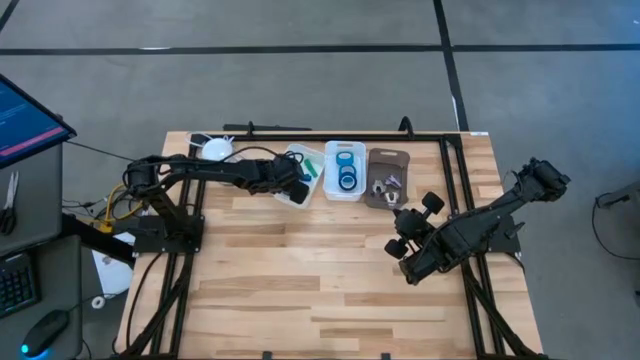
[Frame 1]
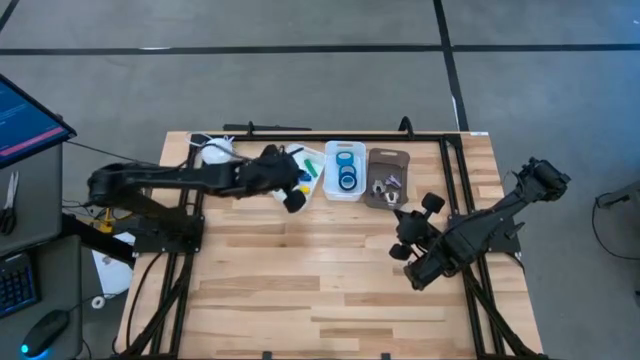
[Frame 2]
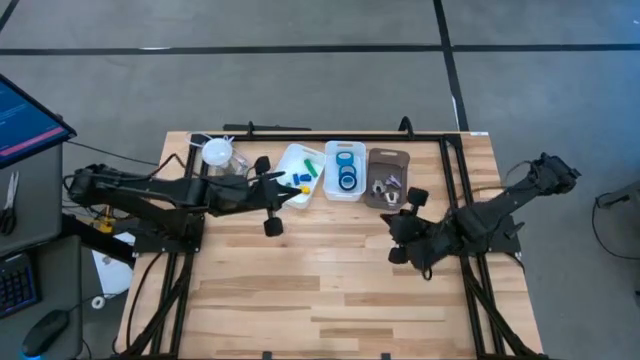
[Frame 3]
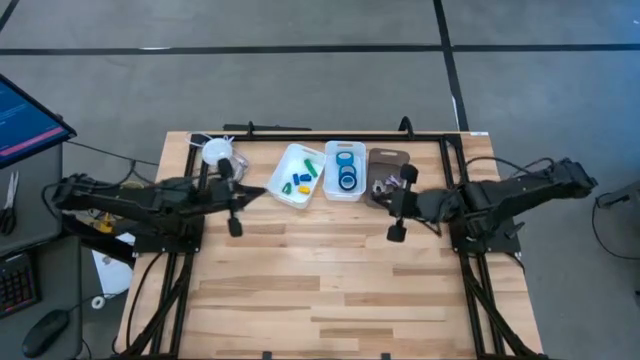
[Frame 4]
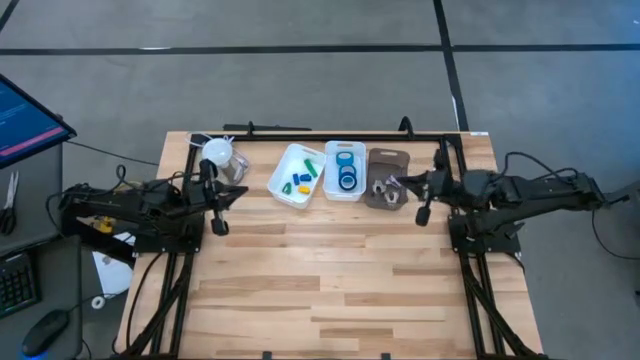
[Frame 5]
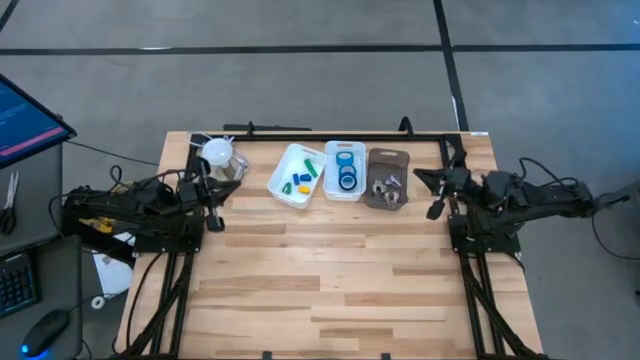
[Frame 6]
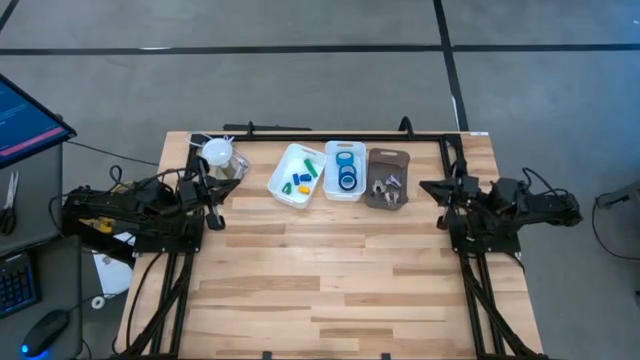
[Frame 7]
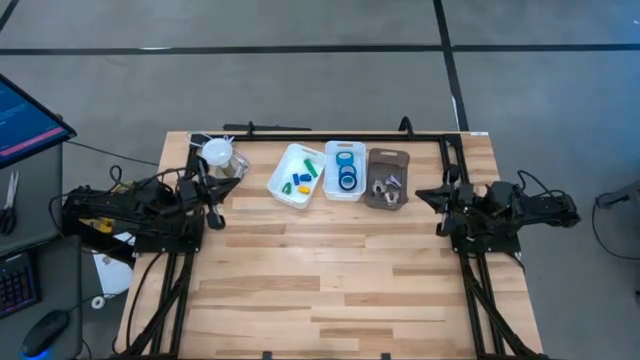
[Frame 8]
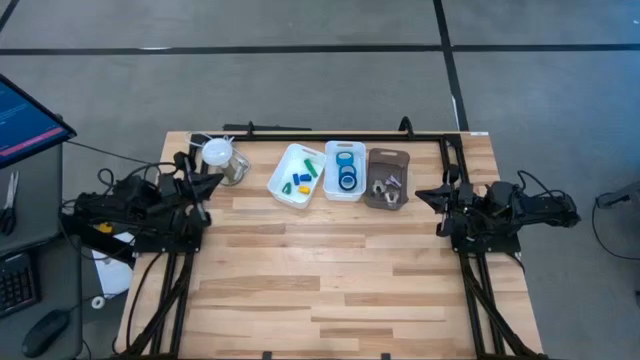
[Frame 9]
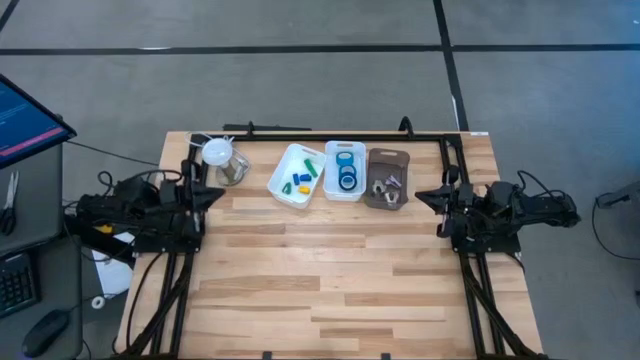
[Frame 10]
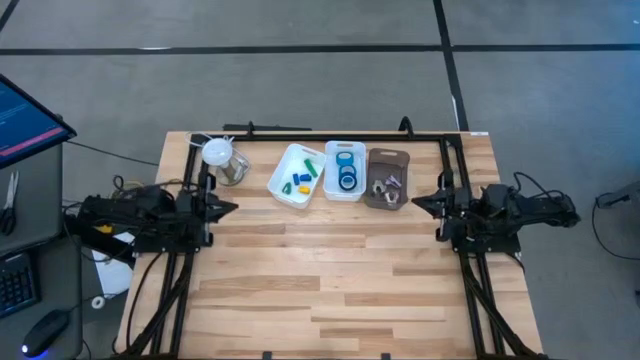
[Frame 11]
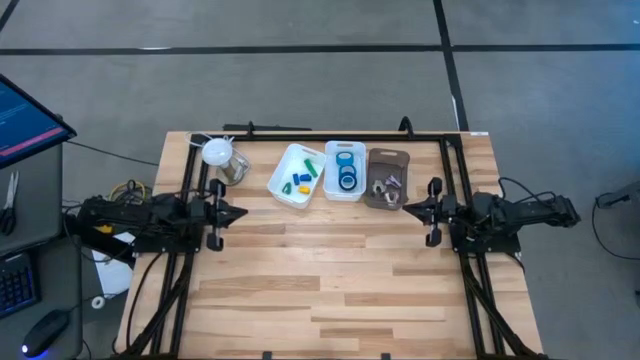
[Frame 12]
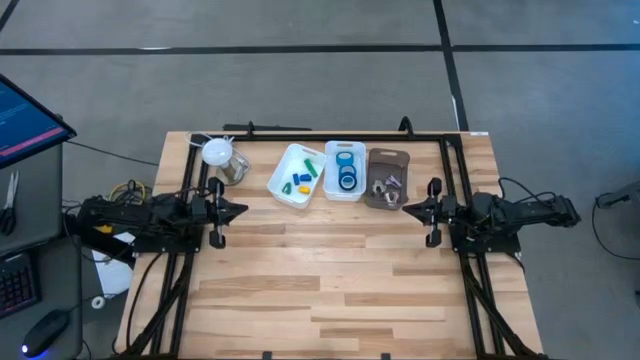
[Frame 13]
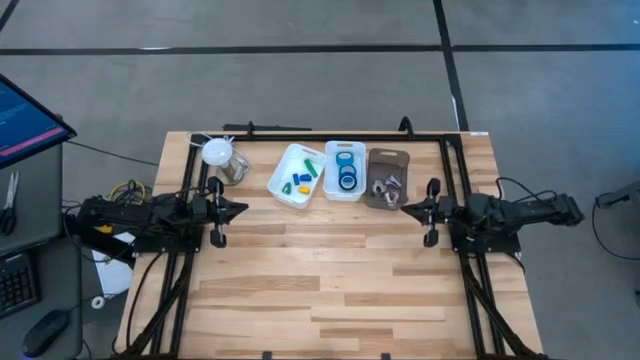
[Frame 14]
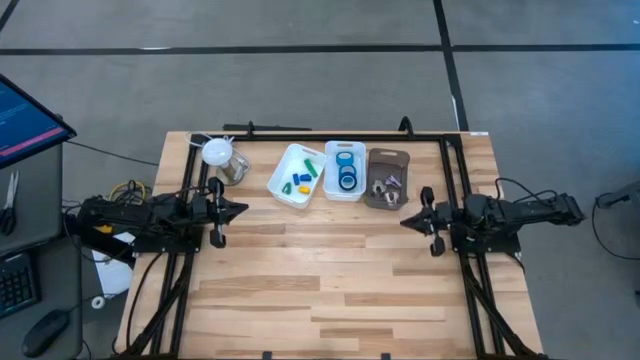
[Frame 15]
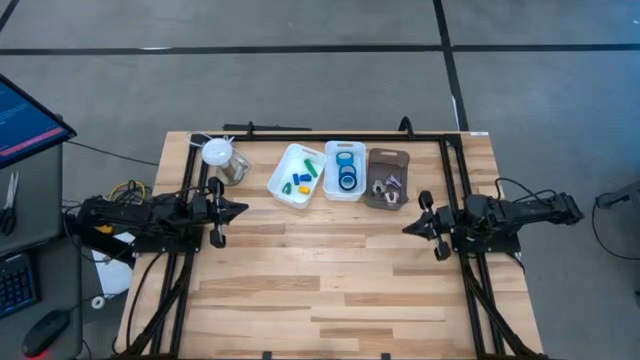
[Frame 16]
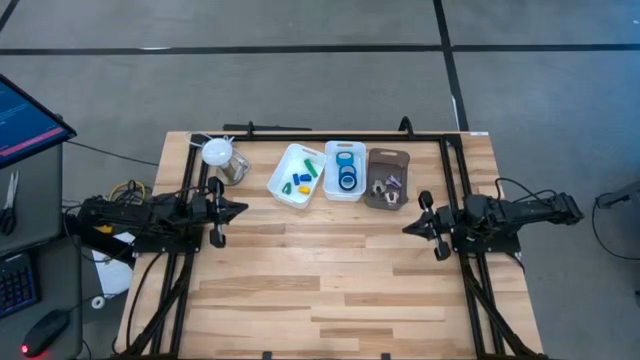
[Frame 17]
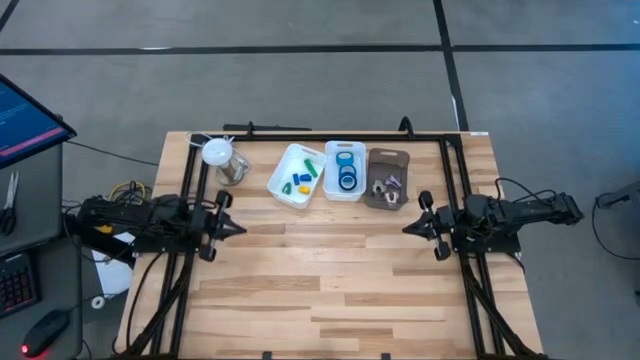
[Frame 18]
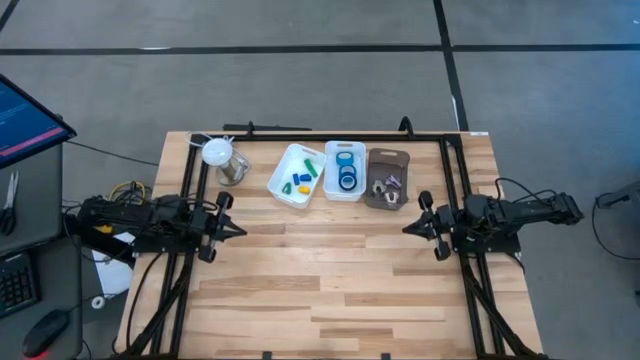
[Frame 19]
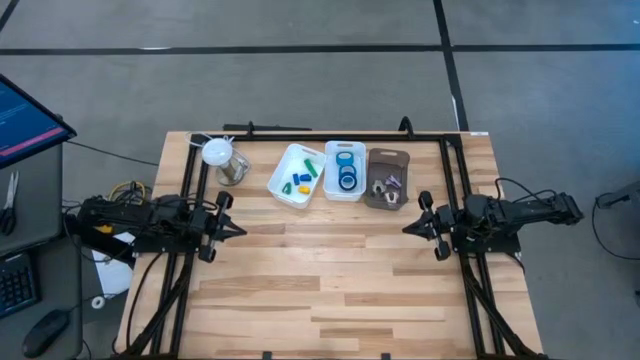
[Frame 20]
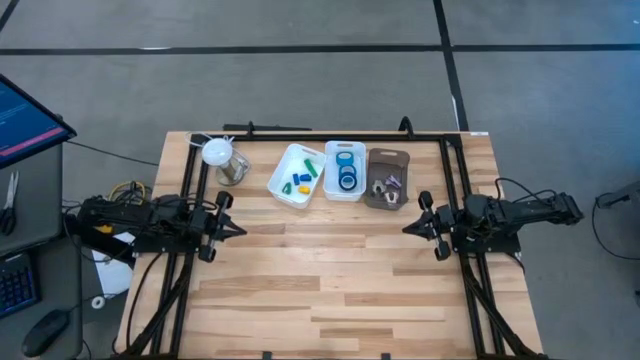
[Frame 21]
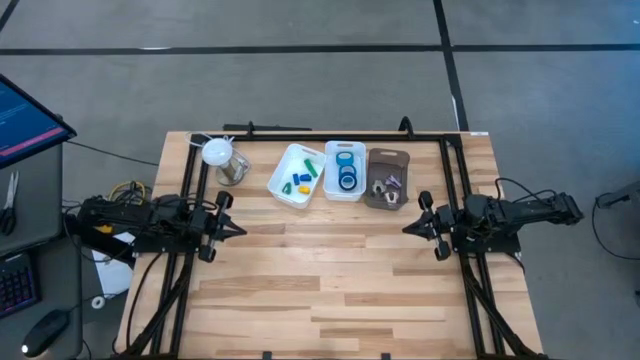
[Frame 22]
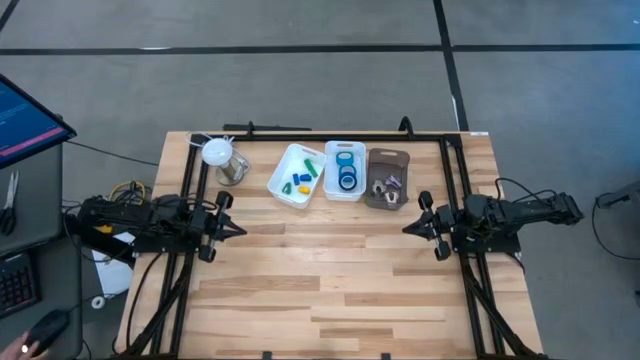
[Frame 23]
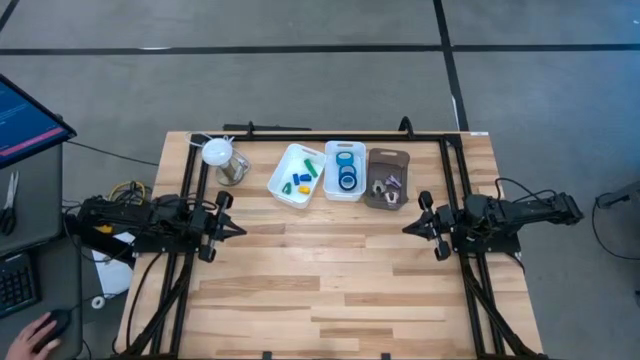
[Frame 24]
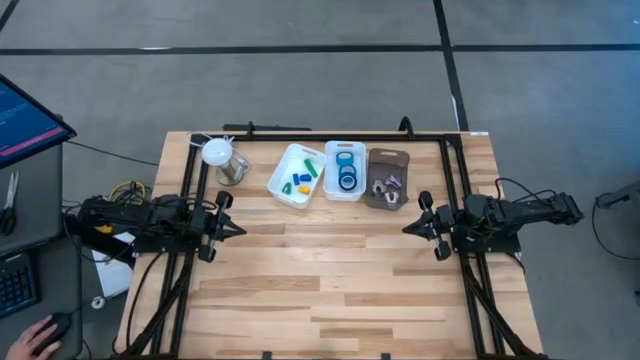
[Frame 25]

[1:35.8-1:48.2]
Task: Pick and place Stapler, Stapler remover, tape
Return to Home Position

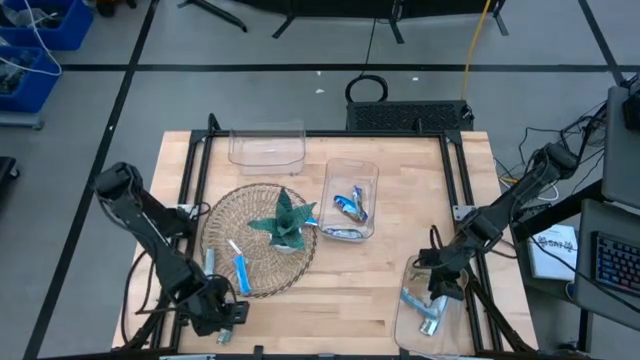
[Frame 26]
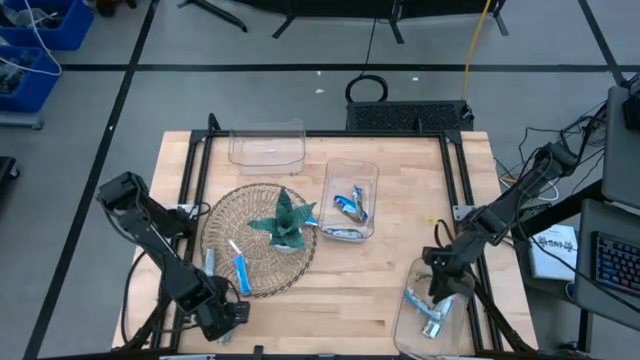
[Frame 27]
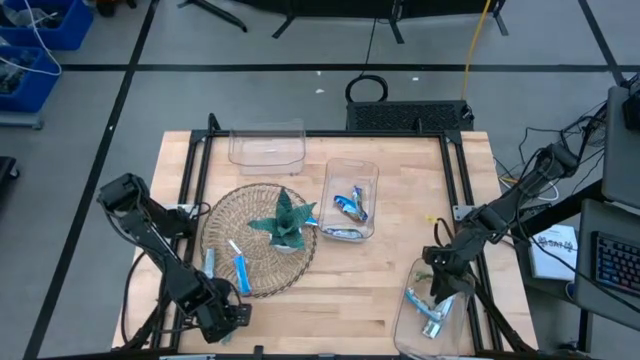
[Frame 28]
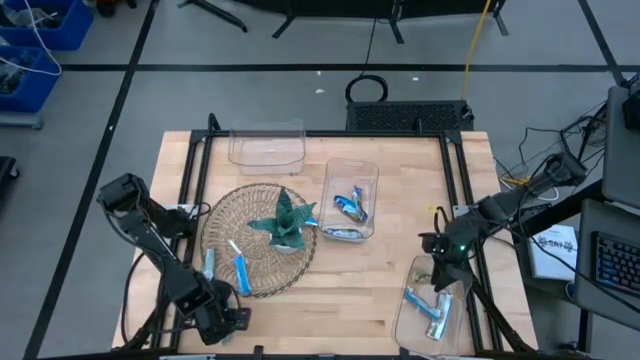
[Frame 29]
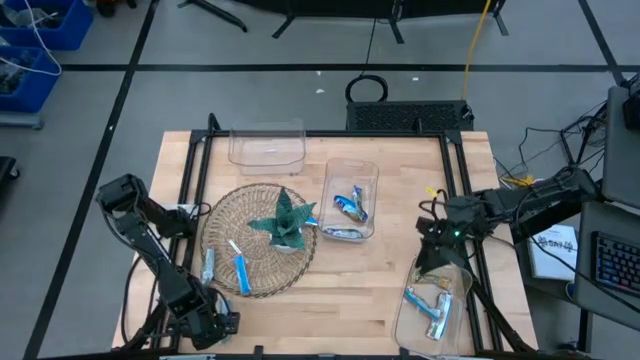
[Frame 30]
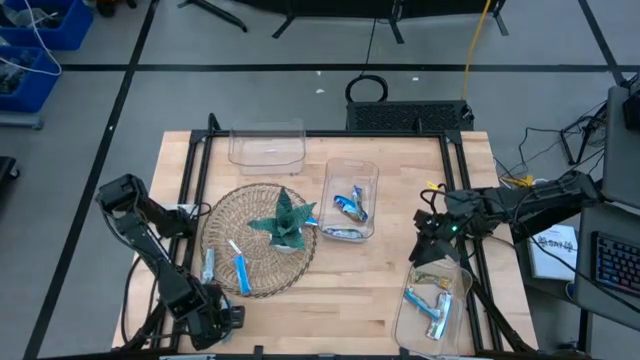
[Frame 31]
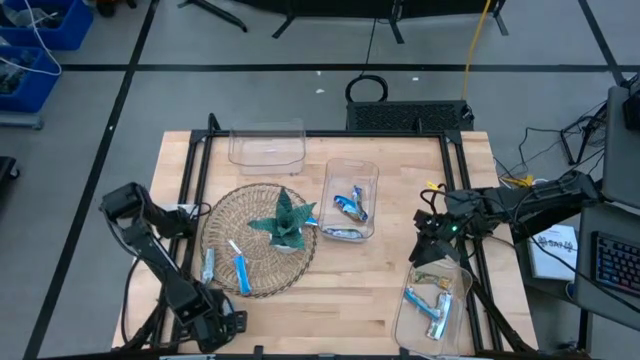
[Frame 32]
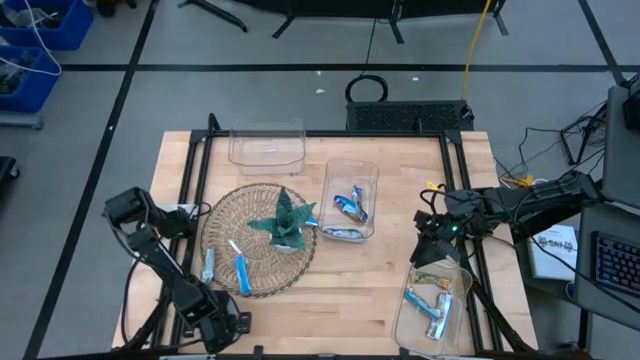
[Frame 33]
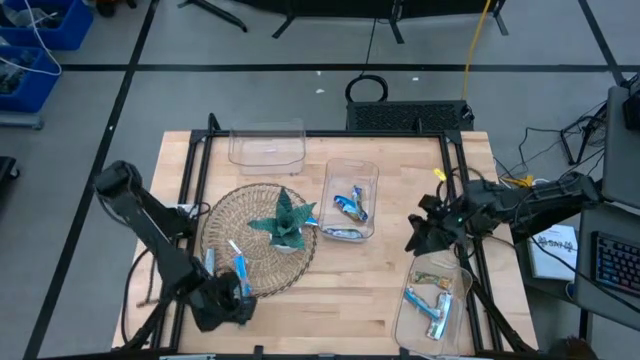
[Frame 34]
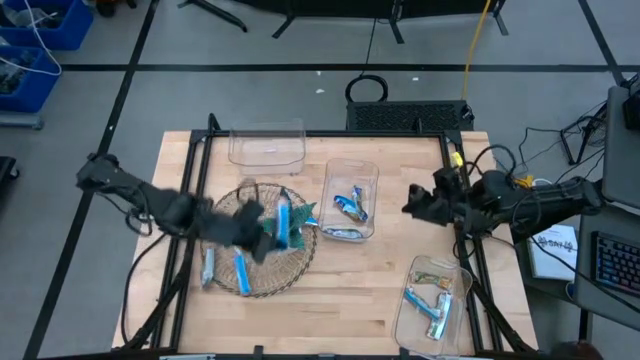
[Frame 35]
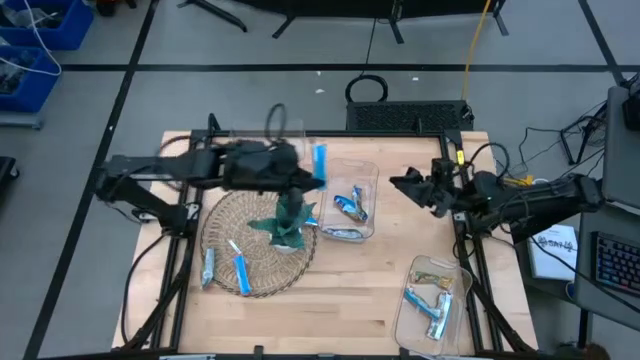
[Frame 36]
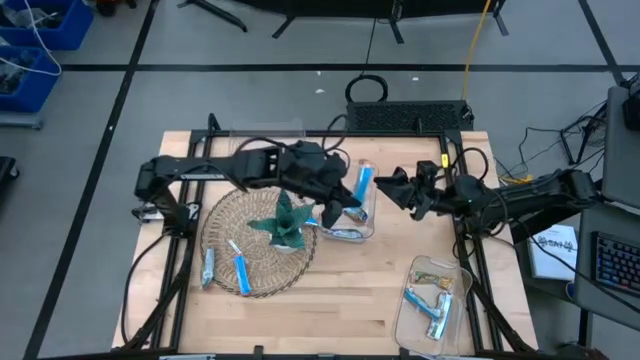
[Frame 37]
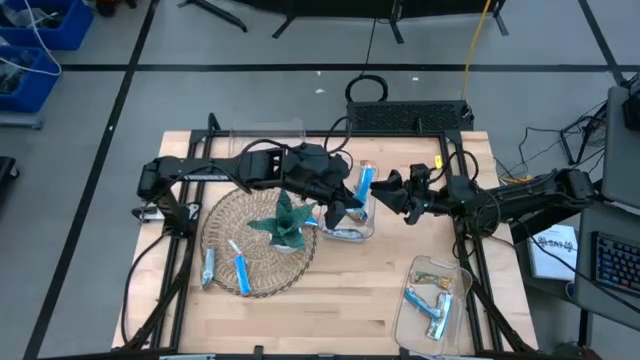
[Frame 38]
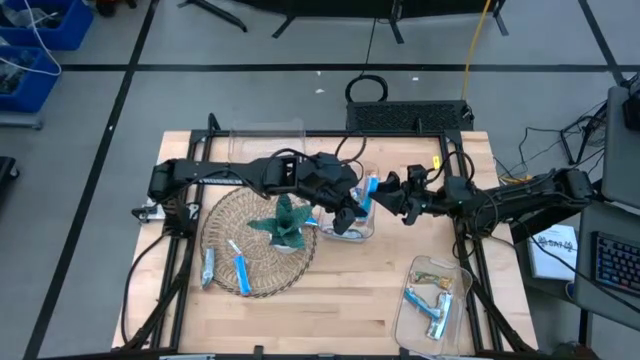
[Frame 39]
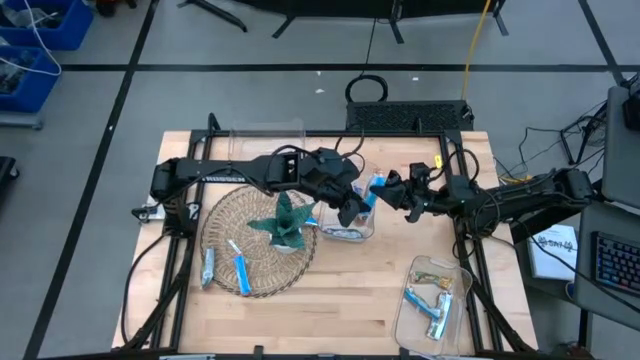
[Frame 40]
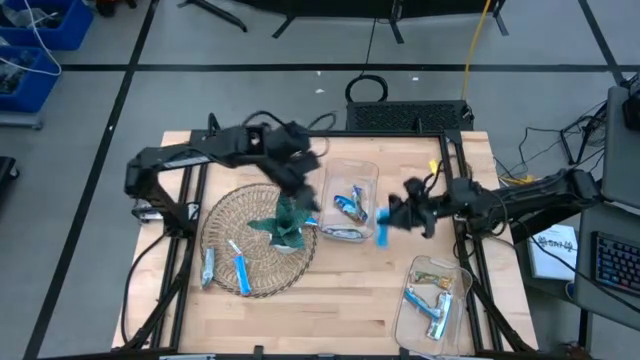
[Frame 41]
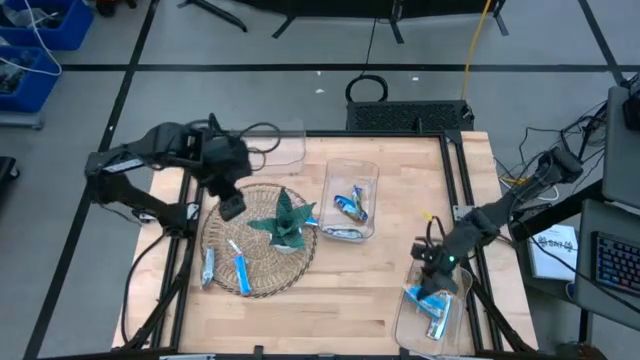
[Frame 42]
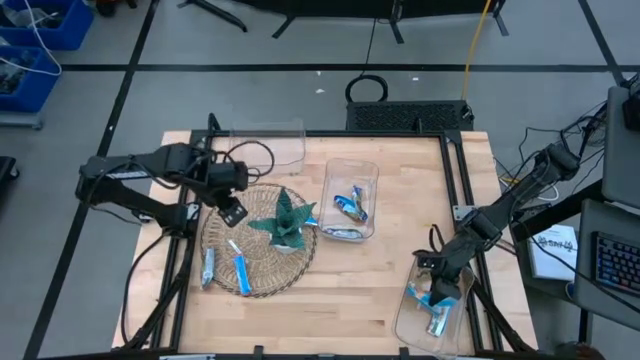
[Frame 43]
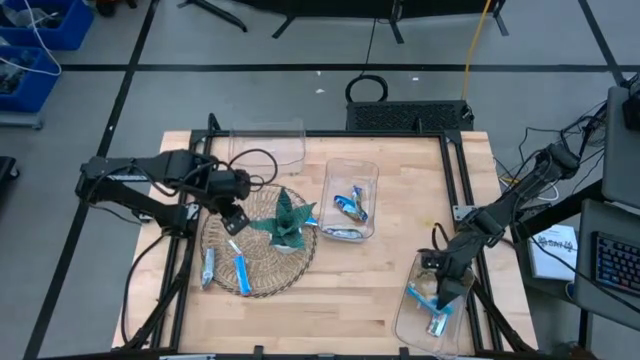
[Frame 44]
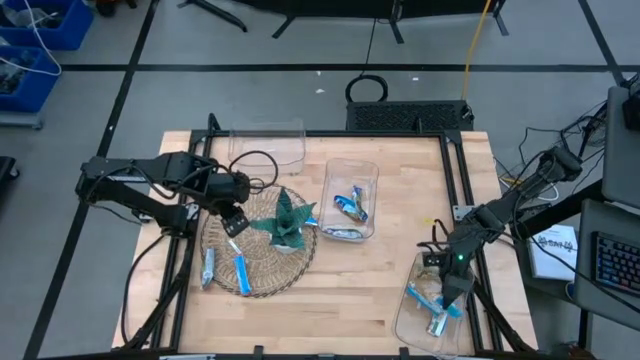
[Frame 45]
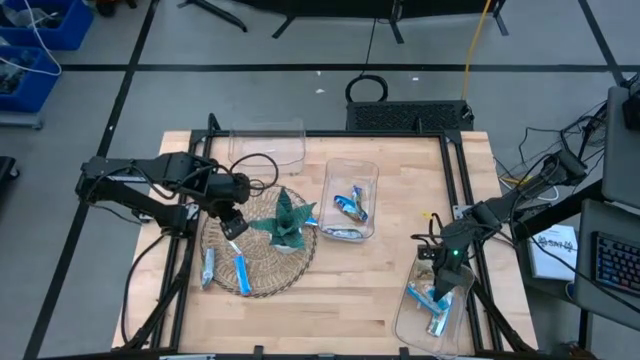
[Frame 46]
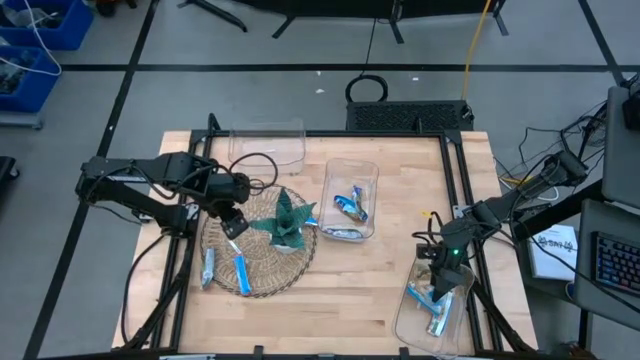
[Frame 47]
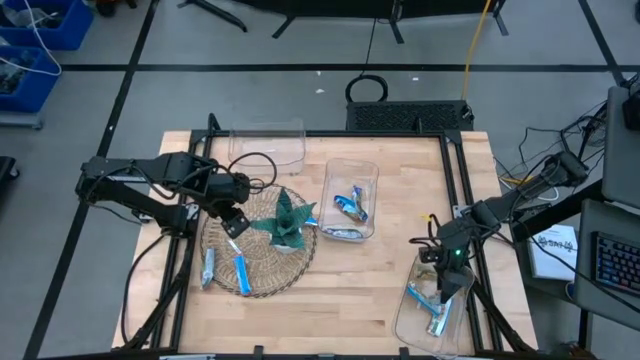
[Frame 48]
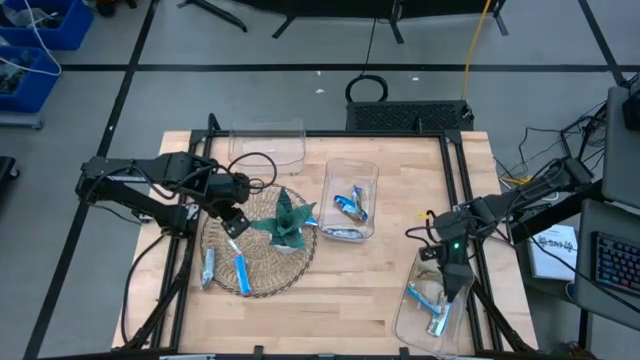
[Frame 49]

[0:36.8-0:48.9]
Task: Pick and place Granola Bars by type
Put the orange granola bar into the bottom transparent bin
